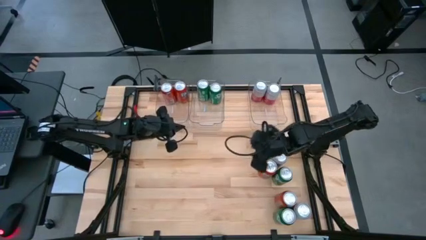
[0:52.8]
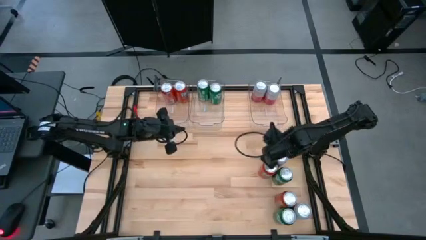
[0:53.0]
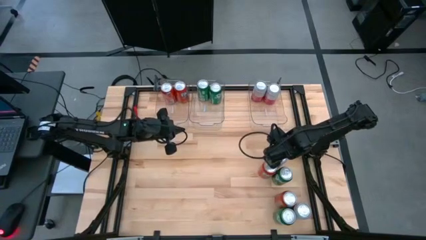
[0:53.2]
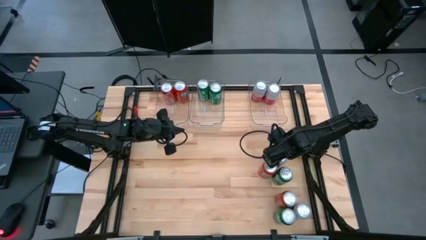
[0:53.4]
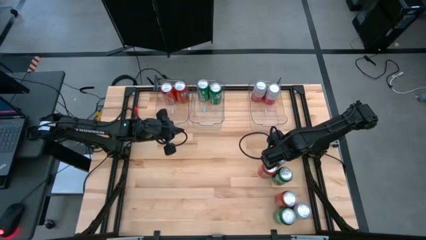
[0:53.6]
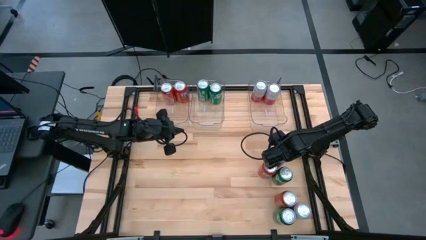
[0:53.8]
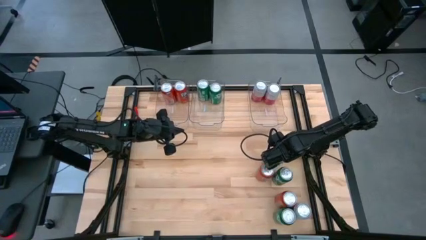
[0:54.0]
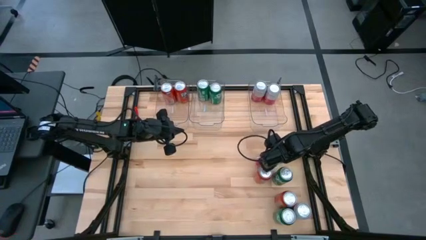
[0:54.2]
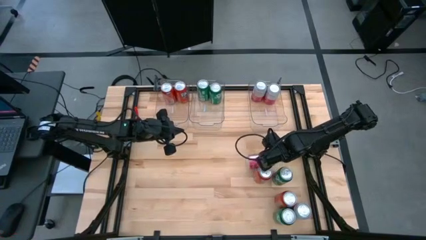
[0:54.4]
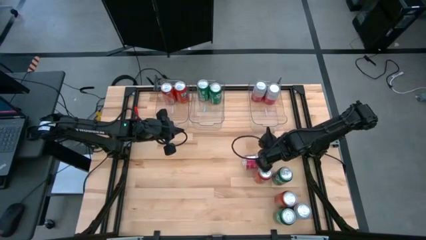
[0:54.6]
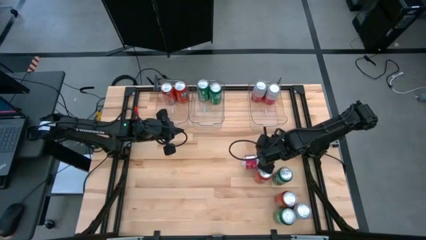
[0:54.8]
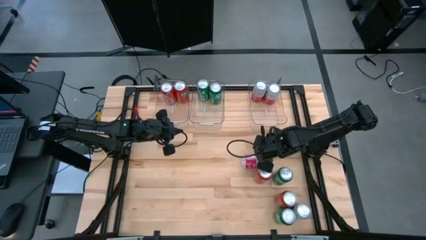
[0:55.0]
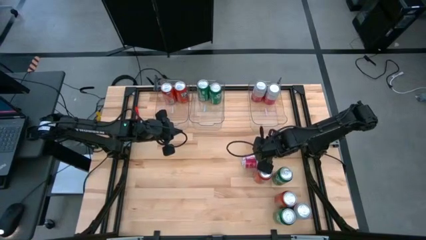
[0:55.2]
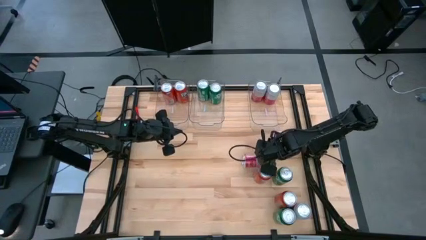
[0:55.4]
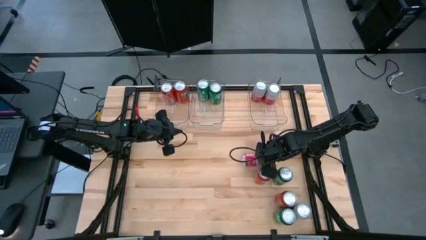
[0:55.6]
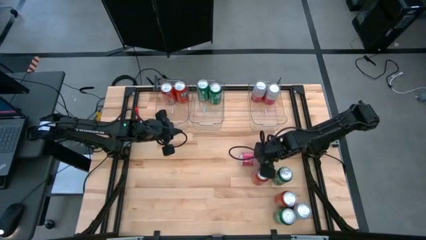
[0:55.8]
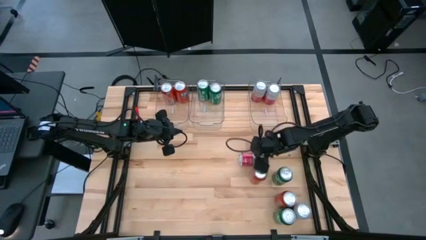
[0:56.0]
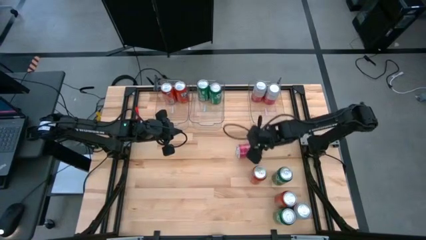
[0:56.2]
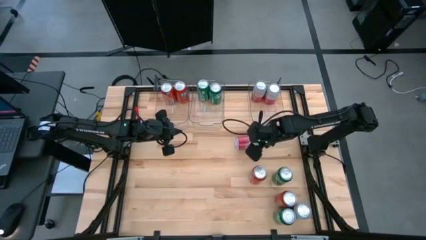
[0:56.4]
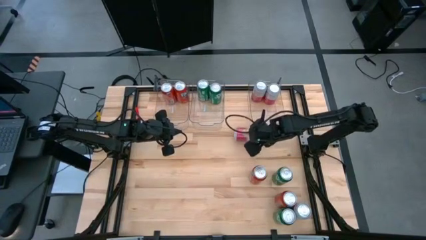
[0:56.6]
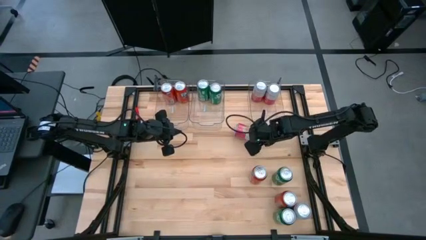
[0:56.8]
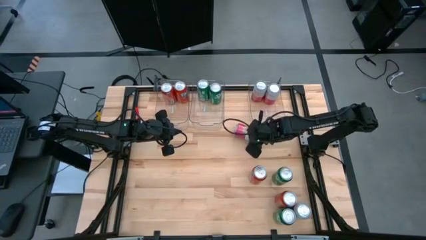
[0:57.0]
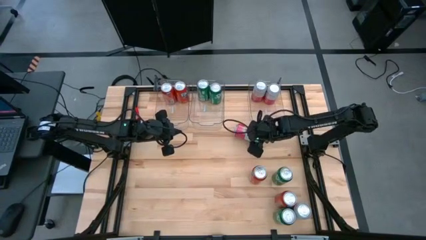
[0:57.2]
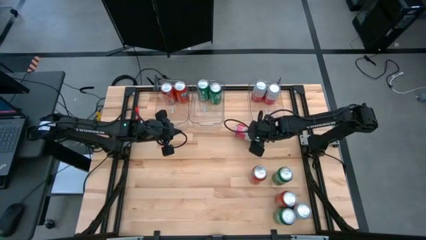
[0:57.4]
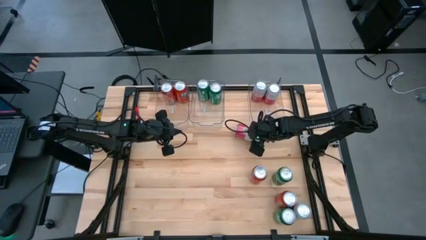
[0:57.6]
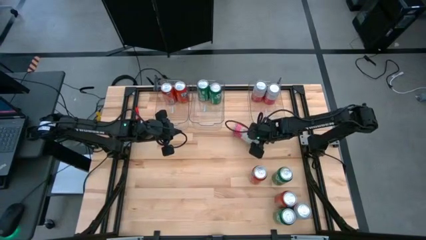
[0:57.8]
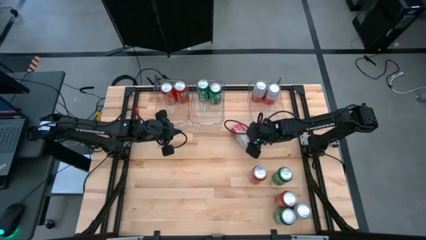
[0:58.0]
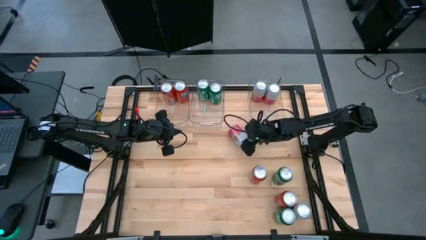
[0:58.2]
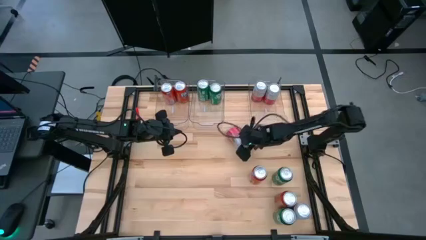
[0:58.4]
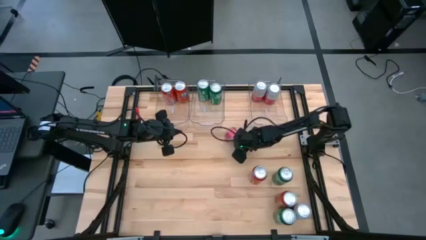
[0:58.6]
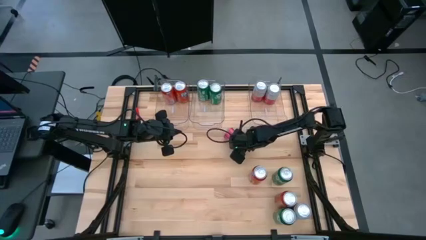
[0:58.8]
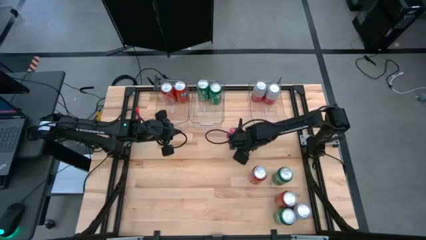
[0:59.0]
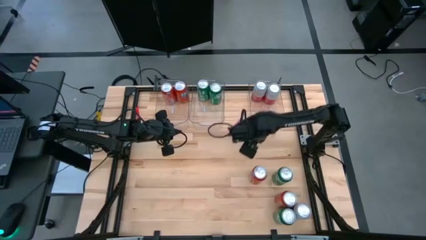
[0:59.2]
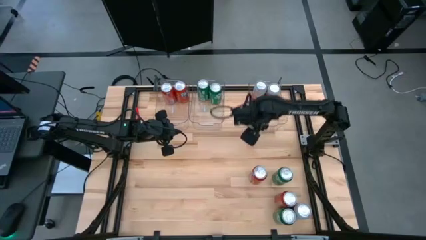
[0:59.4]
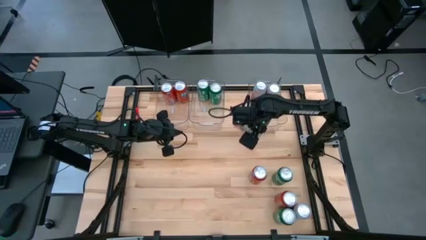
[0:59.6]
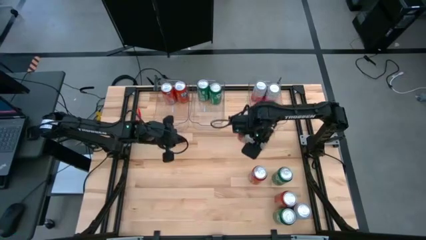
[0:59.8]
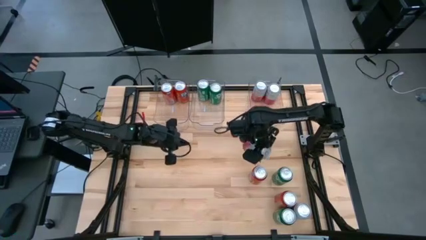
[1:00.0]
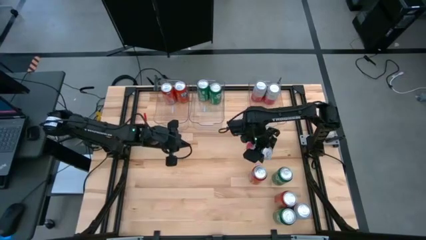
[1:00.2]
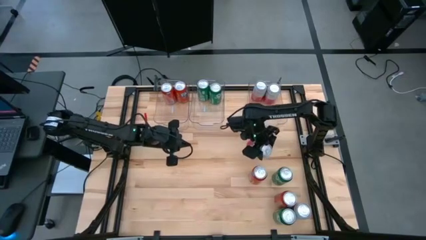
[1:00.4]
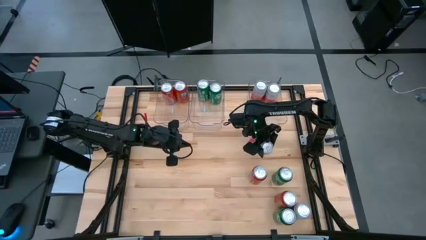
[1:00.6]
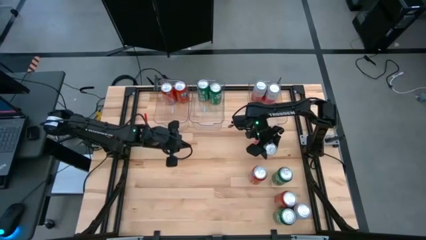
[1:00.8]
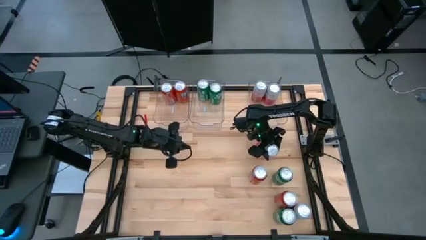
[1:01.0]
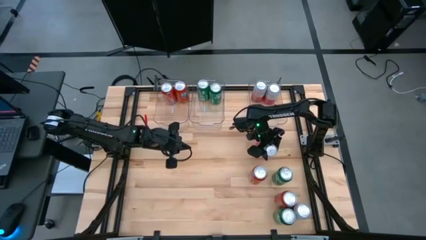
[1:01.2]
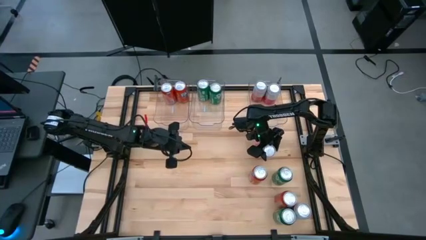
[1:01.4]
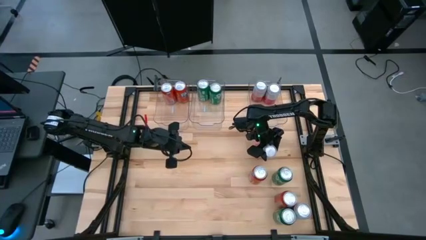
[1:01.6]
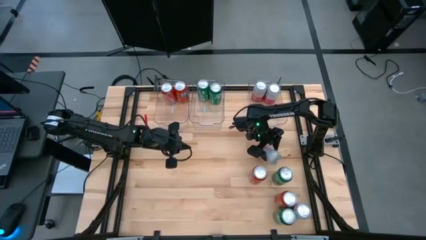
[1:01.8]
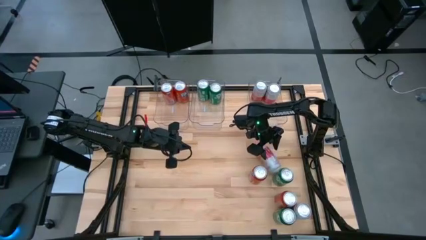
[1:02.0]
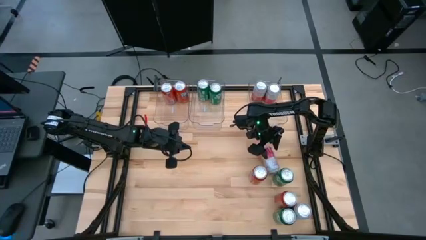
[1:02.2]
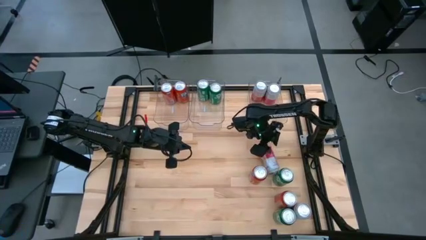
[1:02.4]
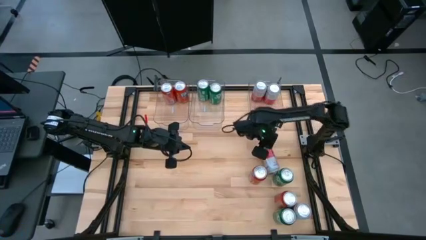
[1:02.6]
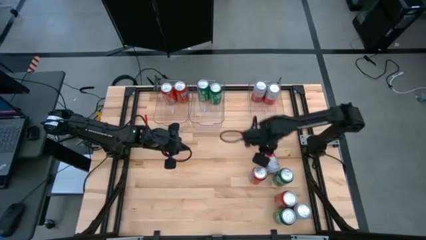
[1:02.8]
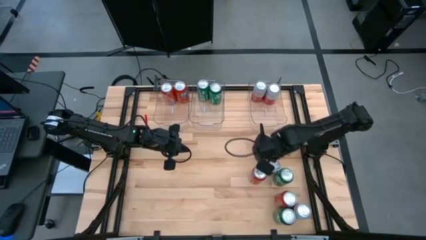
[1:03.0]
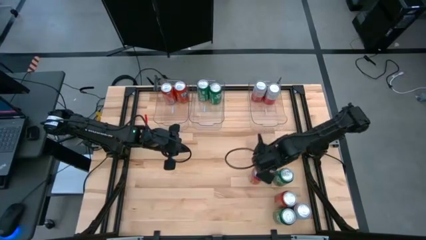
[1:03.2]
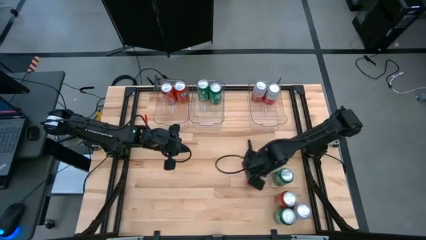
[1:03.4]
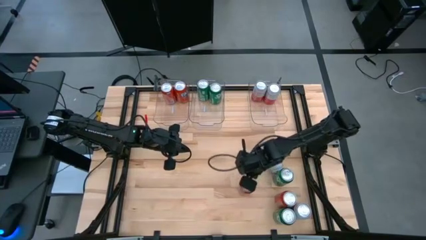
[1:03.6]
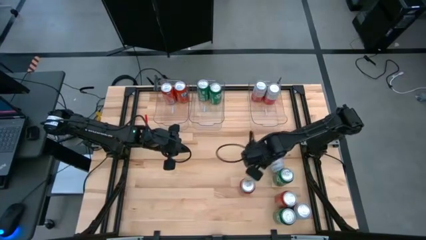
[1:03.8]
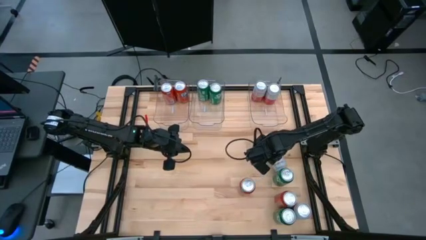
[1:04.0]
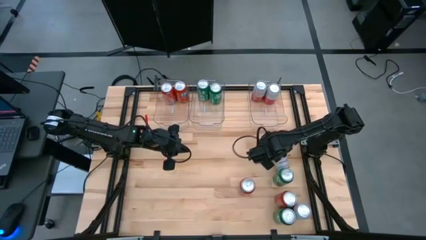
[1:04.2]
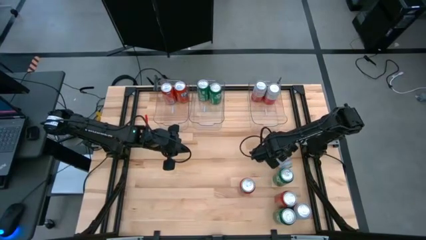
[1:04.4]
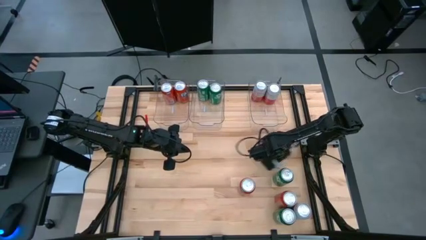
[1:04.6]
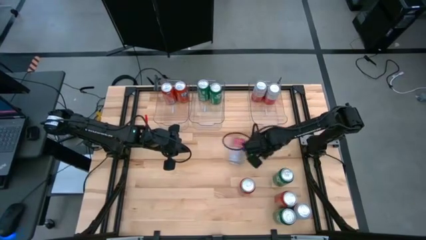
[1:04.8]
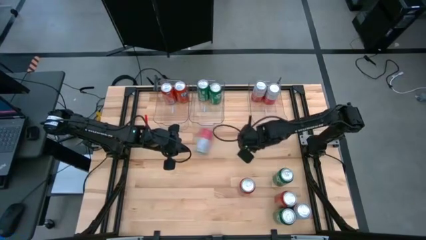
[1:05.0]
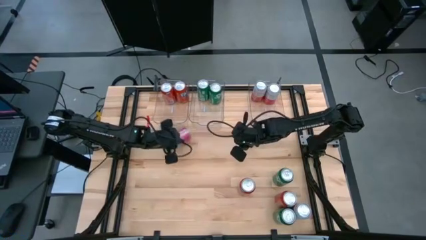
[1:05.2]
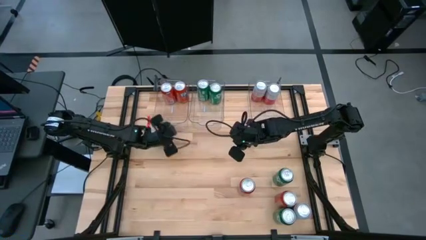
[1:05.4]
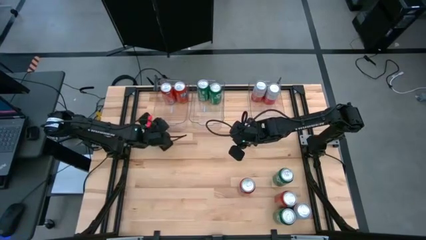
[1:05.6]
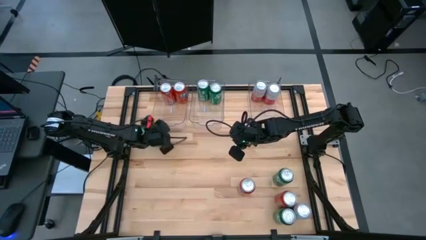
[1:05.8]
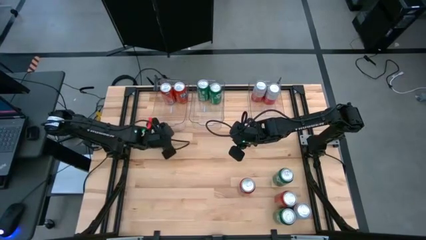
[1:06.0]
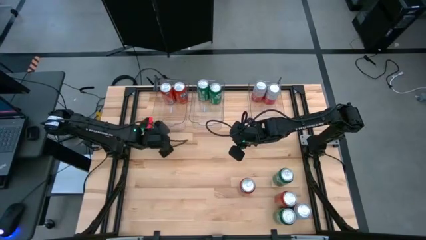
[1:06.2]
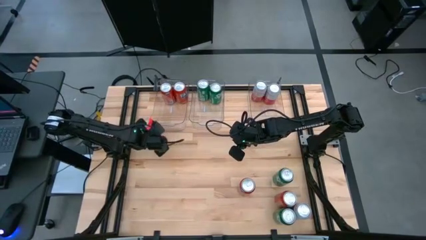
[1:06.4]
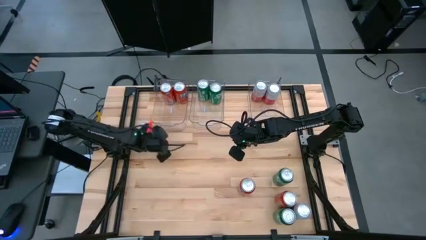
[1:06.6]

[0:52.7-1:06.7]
Task: Sort soda cans
Put the top pink white soda can into the right transparent bin
